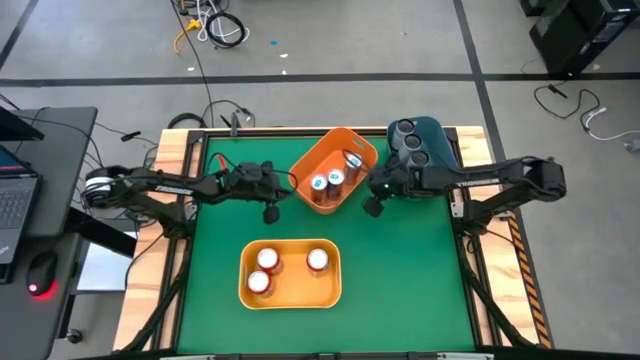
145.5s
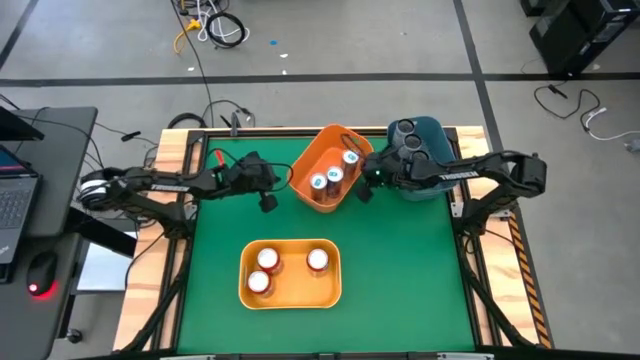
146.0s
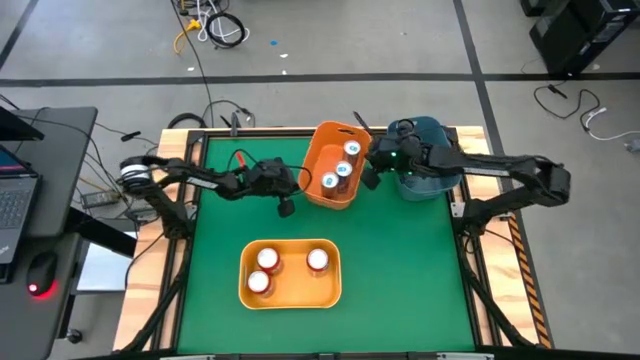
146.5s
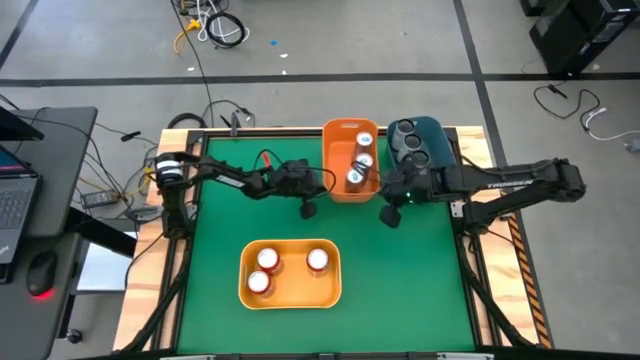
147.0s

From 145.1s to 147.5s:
Task: Sort soda cans
Move the orange bin beside the blue bin

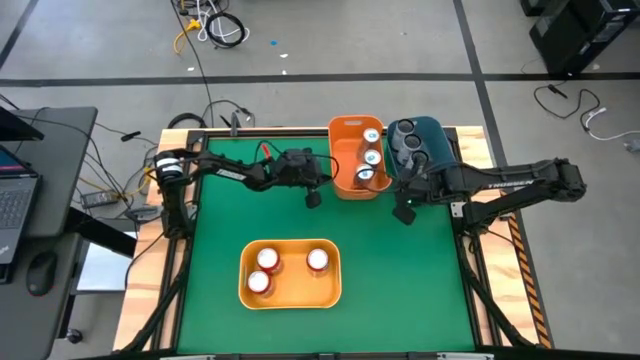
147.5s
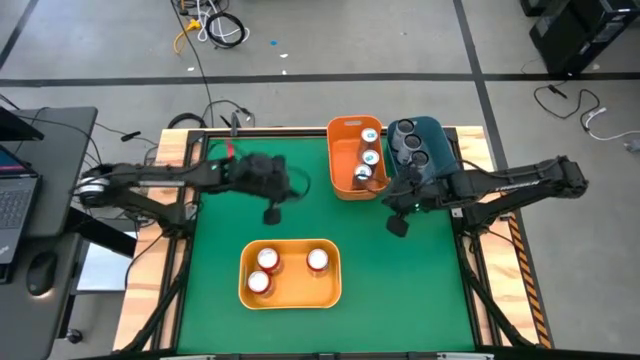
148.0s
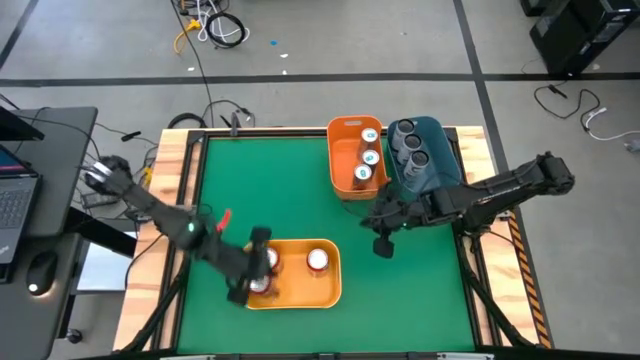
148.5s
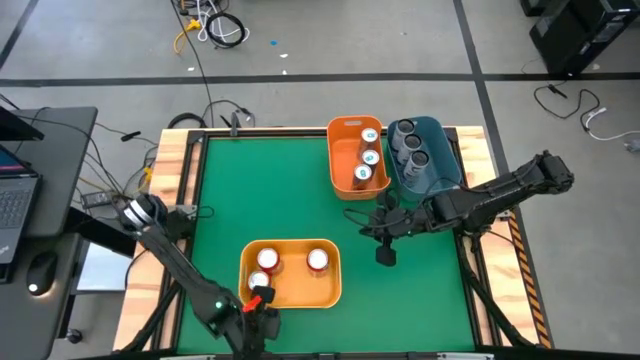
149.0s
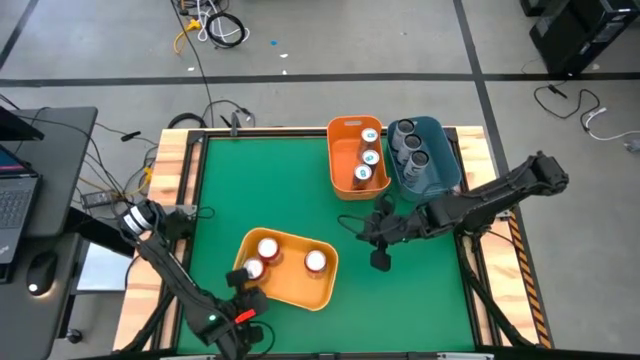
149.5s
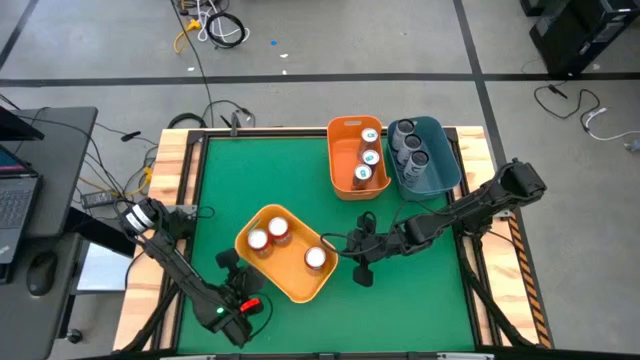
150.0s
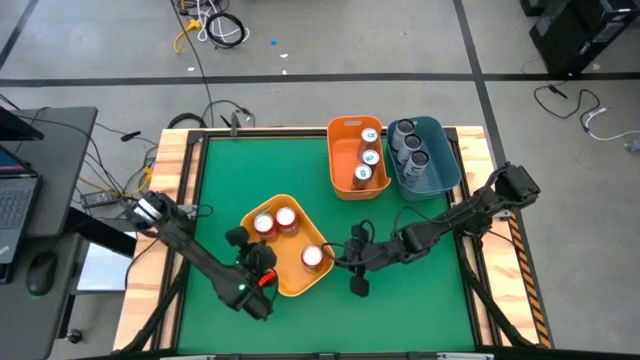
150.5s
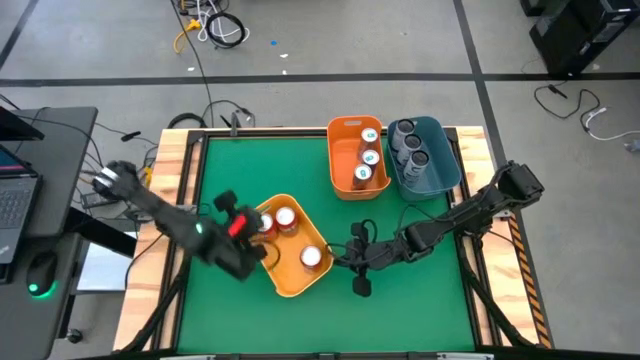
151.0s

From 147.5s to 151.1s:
Adjust the yellow bin

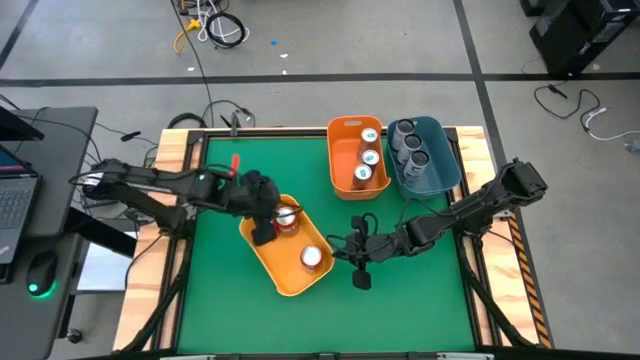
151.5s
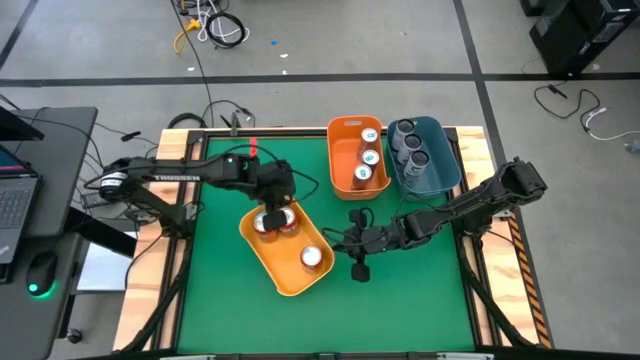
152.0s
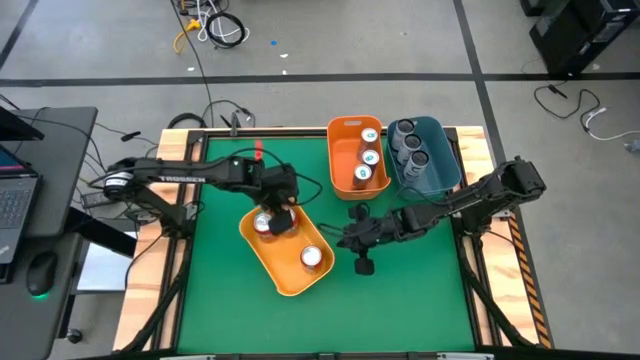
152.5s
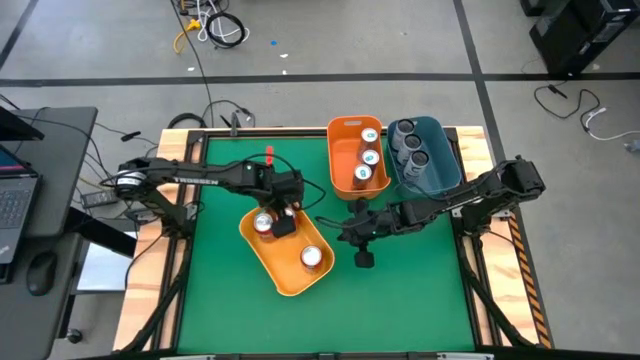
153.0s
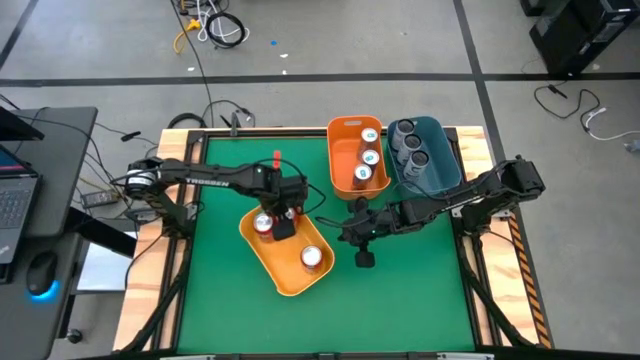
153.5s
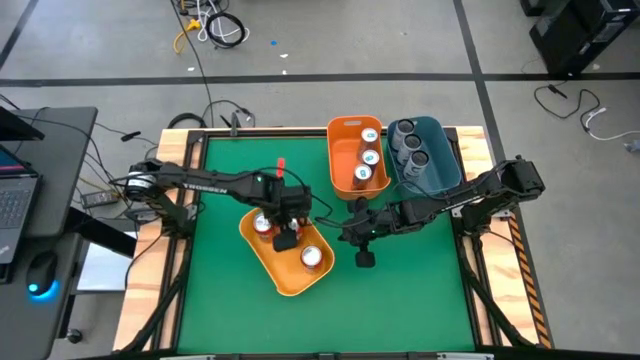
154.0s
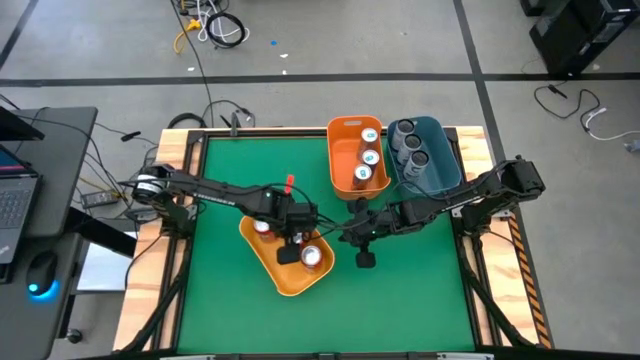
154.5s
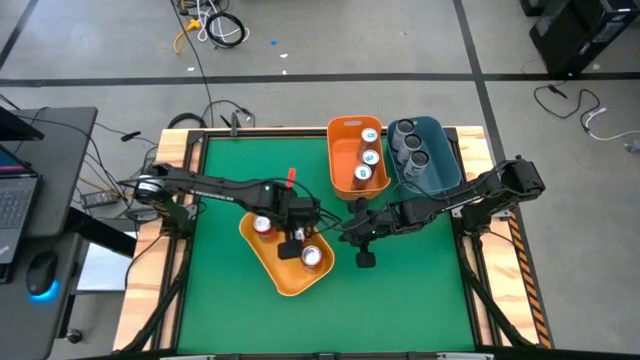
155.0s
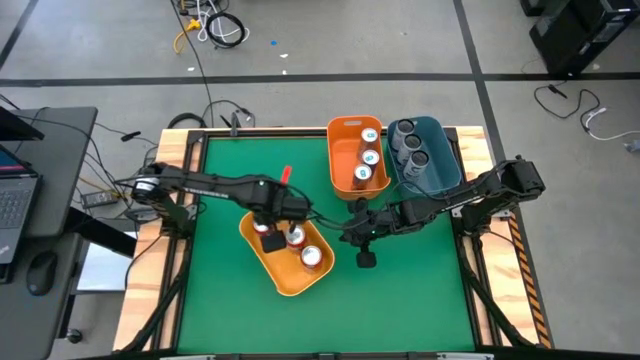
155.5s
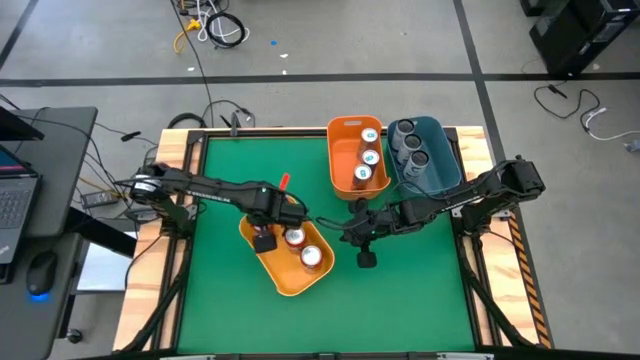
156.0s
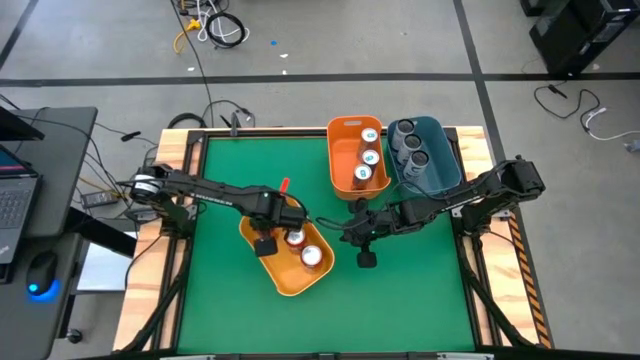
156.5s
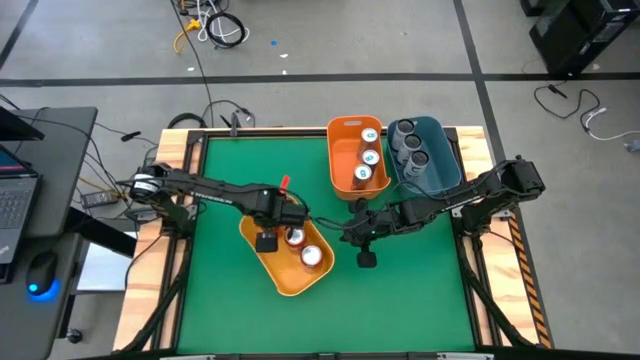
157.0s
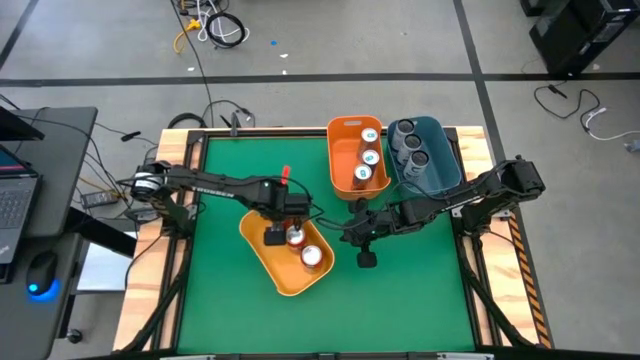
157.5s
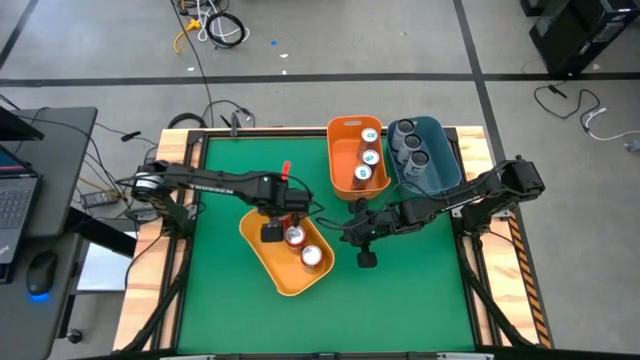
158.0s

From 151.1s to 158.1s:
Adjust the orange soda cans inside the yellow bin

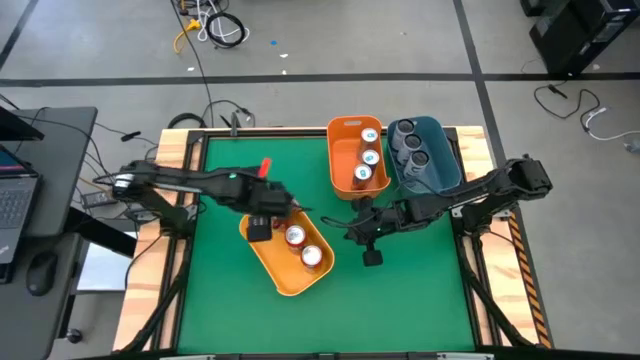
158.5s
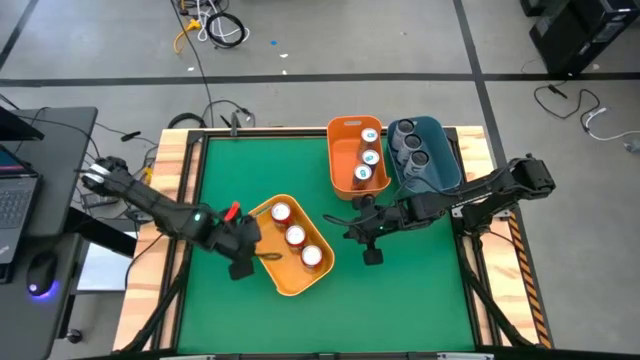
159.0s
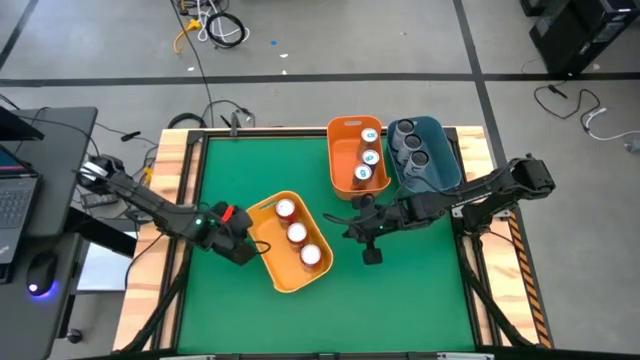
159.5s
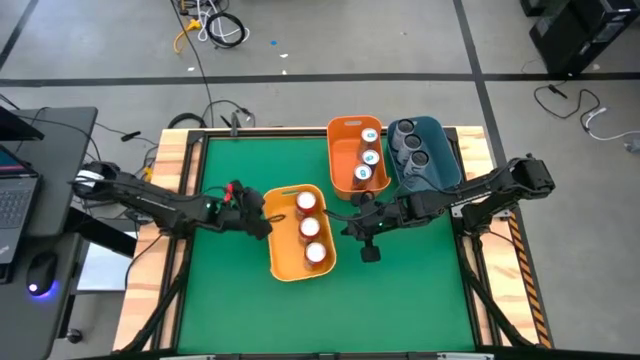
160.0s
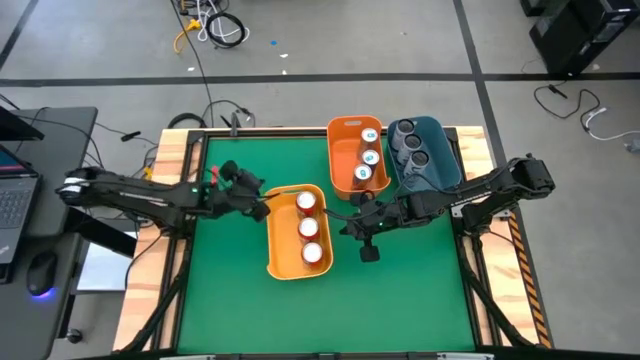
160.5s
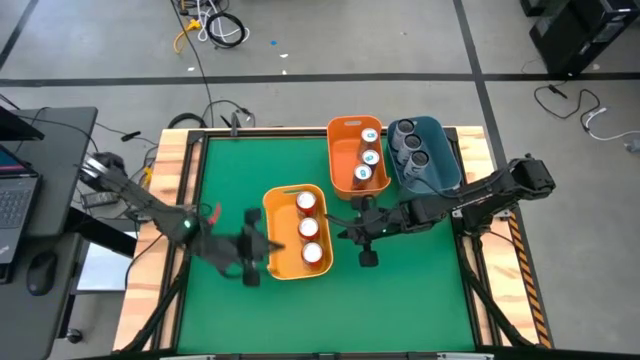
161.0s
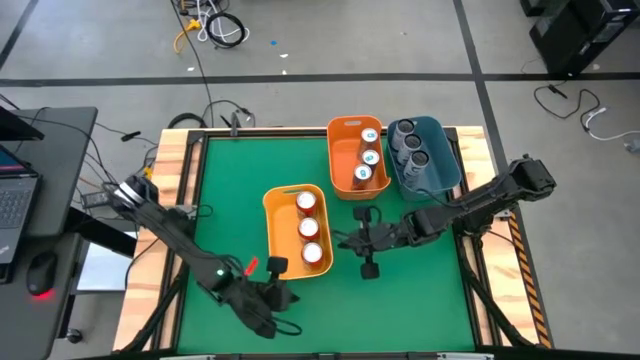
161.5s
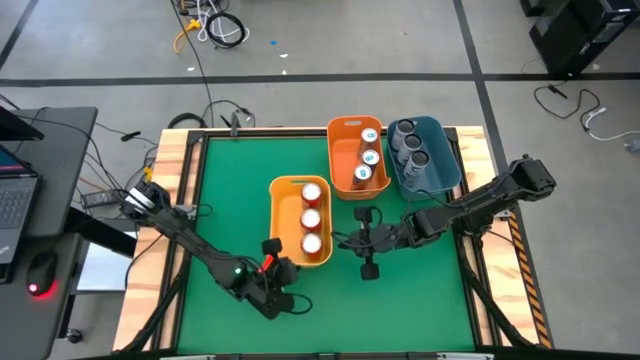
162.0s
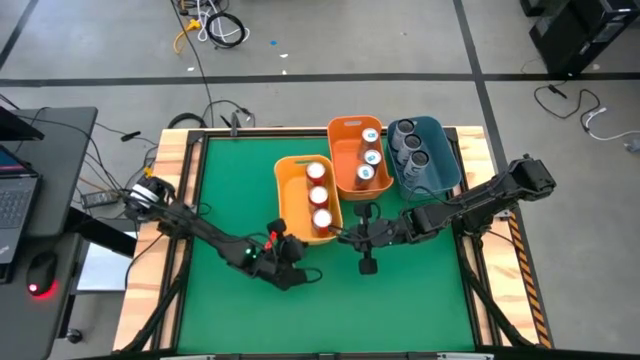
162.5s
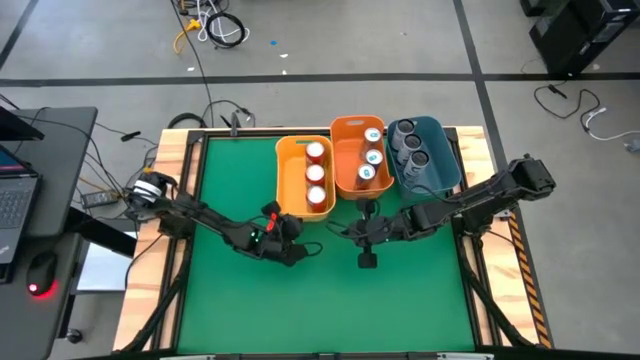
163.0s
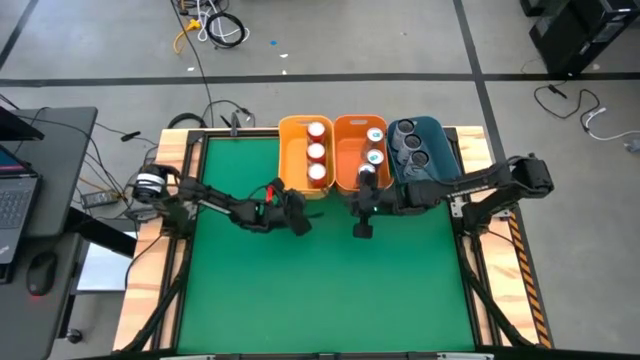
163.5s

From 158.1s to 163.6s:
Move the yellow bin beside the orange bin

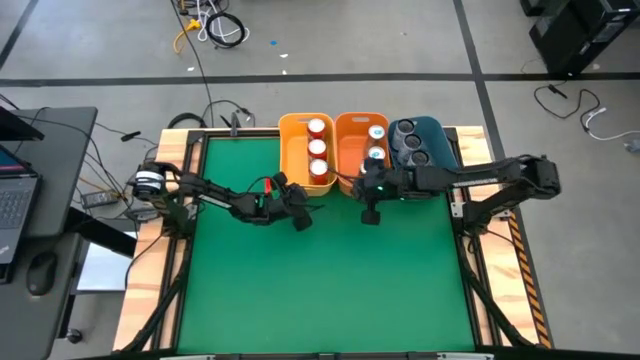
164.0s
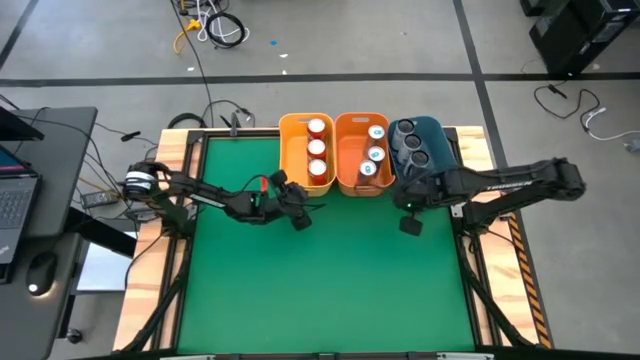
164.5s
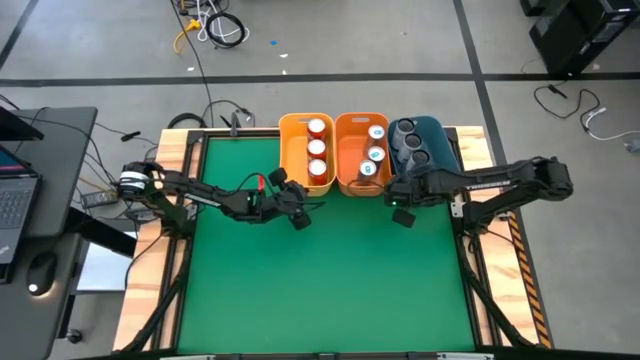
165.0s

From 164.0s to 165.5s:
Adjust the blue bin
